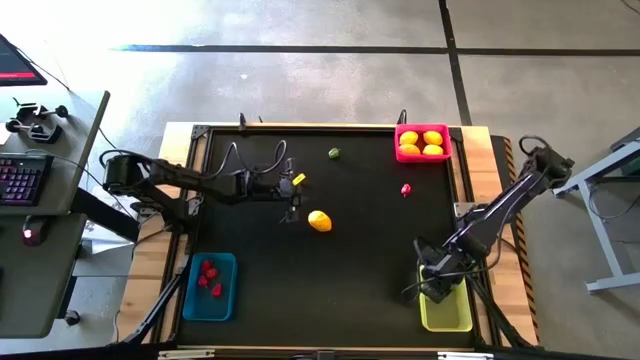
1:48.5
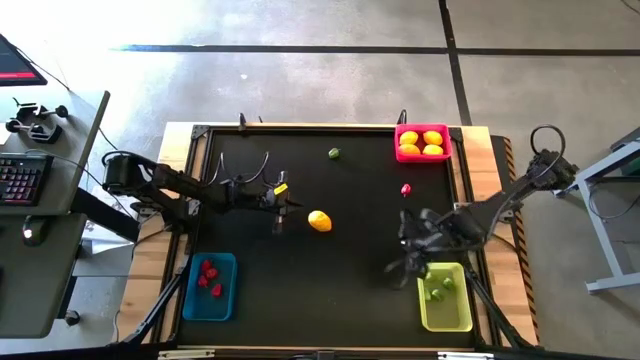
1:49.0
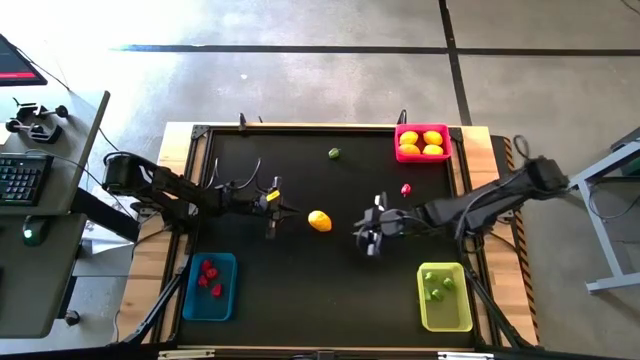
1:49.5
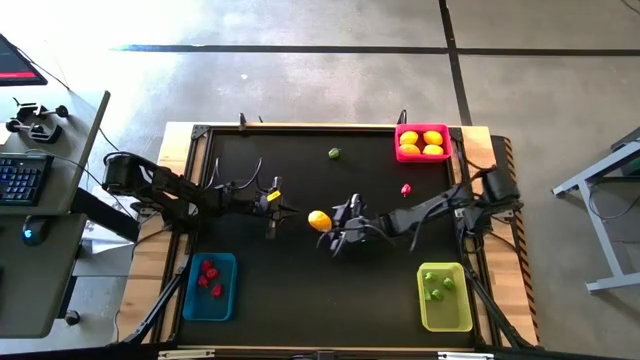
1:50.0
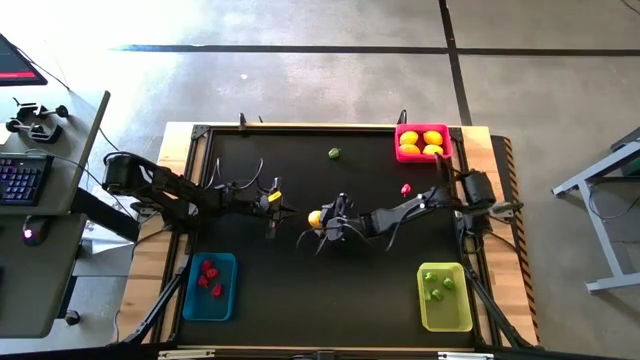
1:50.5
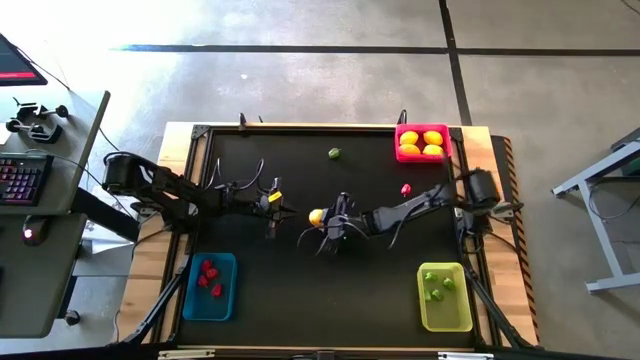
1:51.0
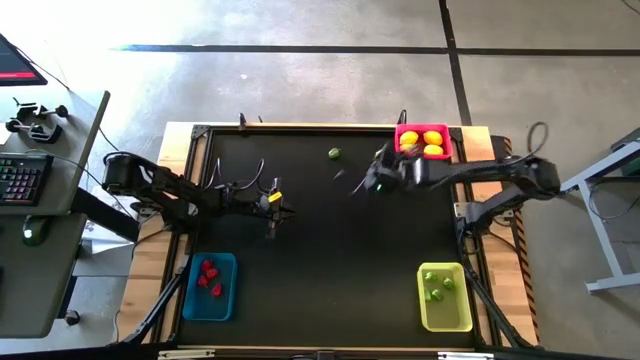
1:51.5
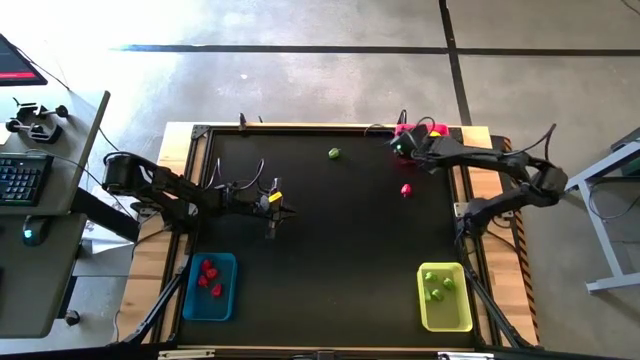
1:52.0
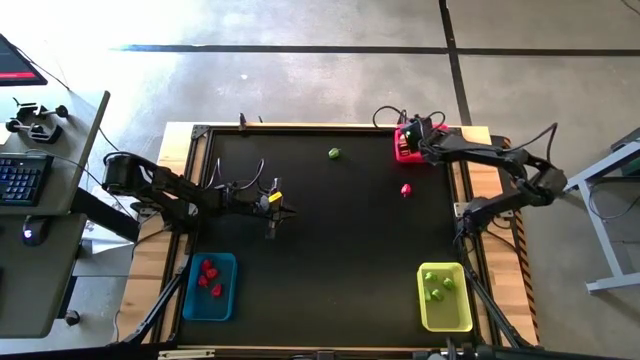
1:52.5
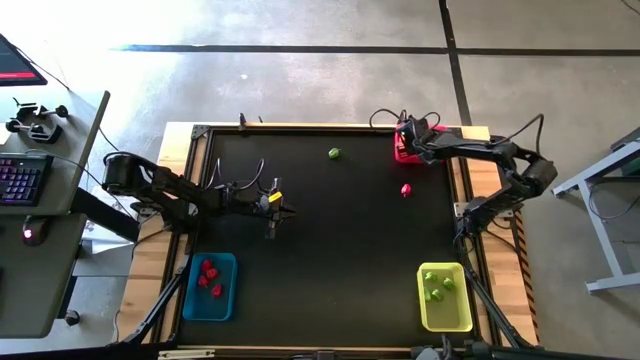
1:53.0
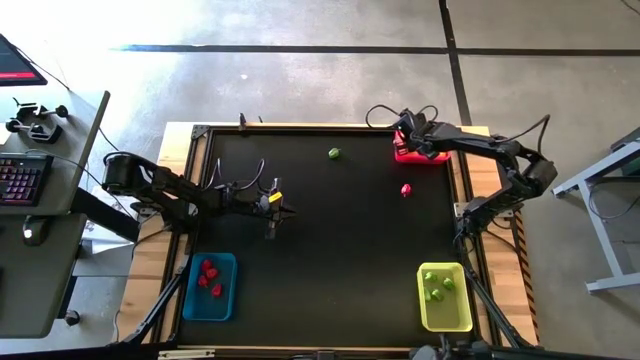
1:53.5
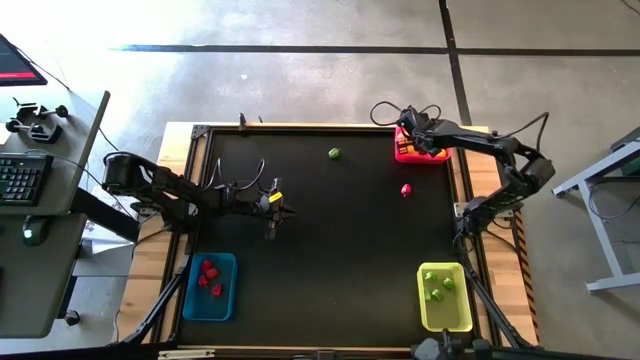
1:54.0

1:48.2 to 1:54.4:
Task: Sort produce into baskets
Put the lemon into the red bin

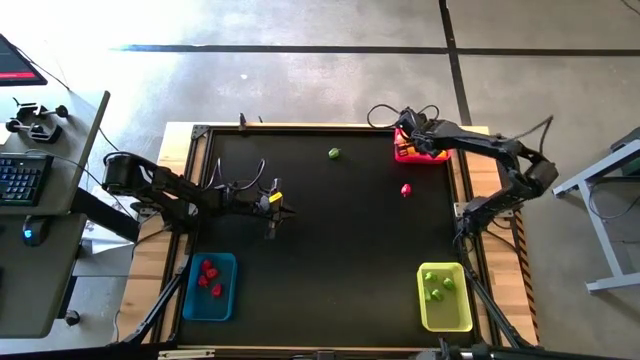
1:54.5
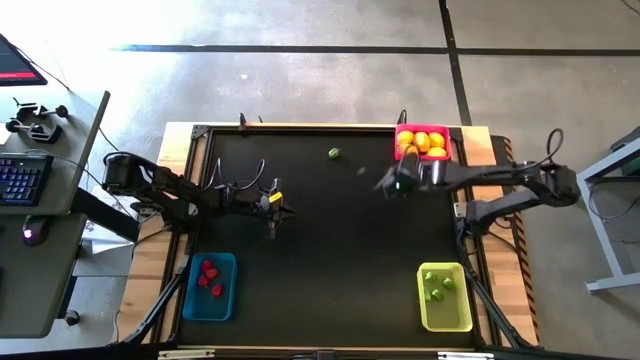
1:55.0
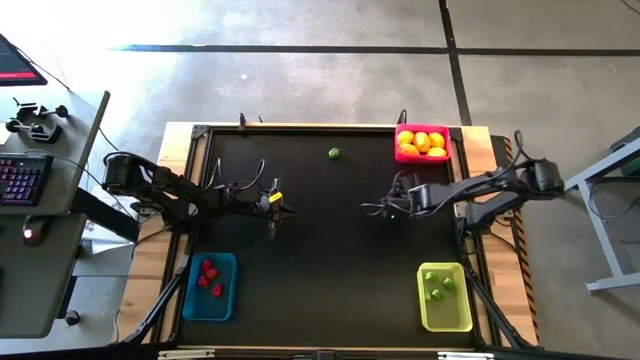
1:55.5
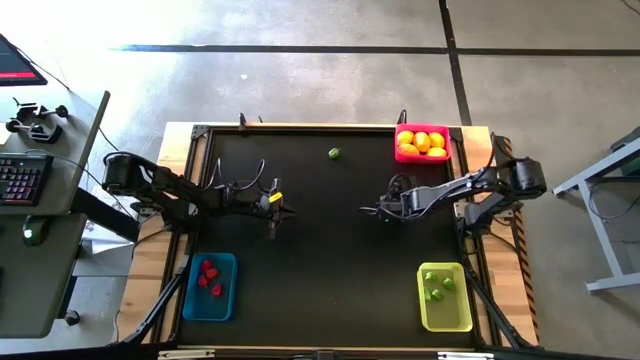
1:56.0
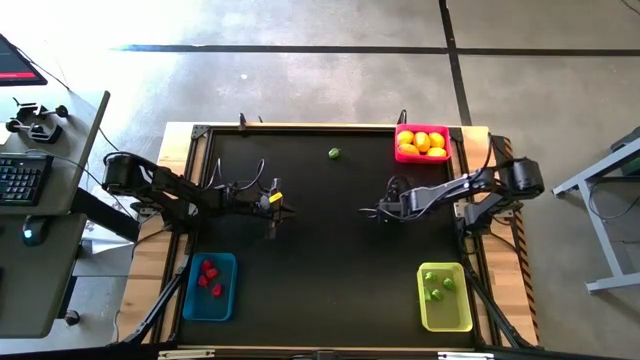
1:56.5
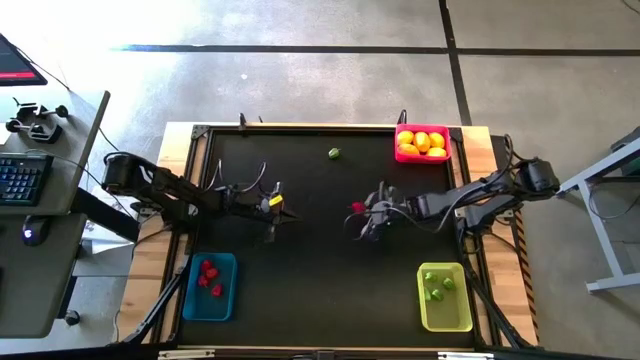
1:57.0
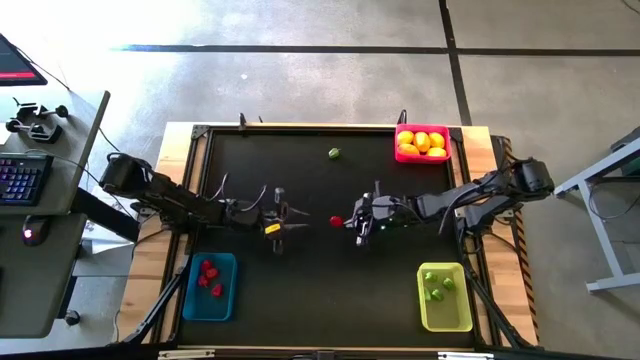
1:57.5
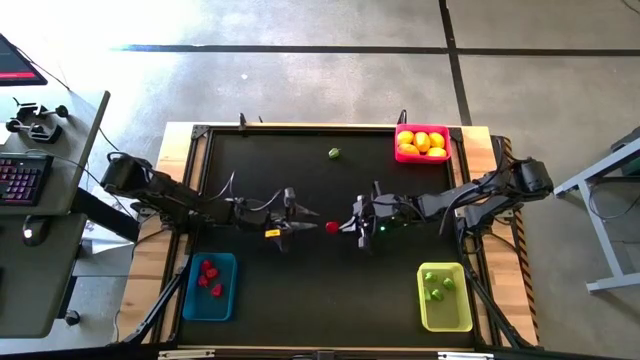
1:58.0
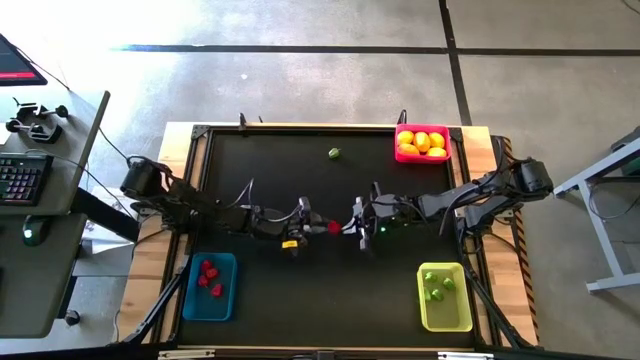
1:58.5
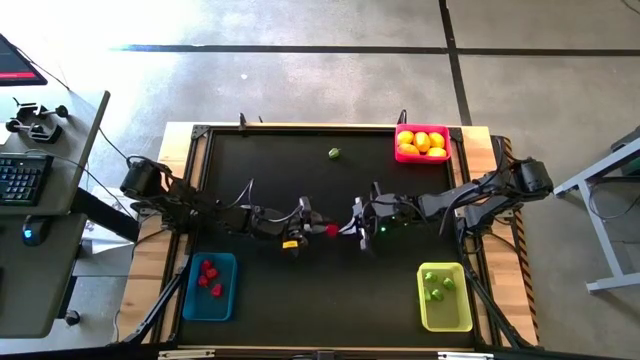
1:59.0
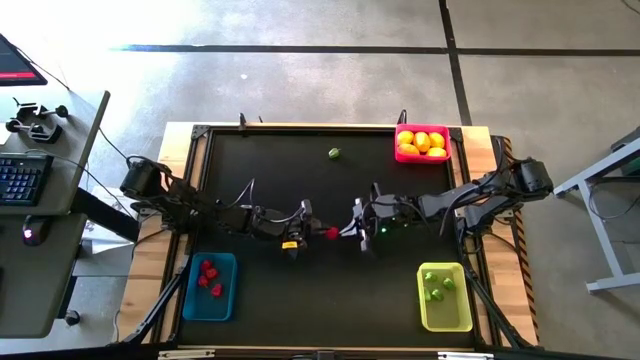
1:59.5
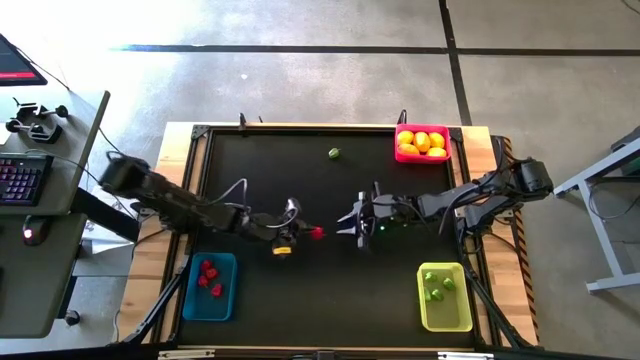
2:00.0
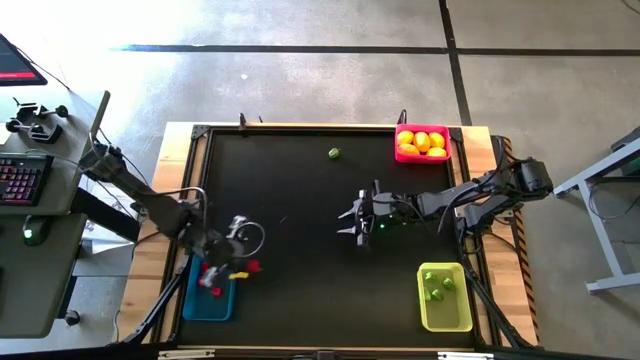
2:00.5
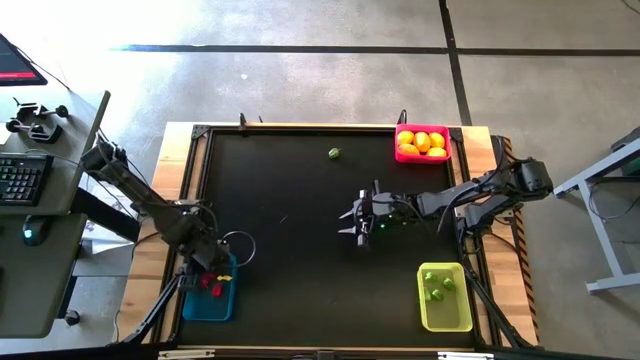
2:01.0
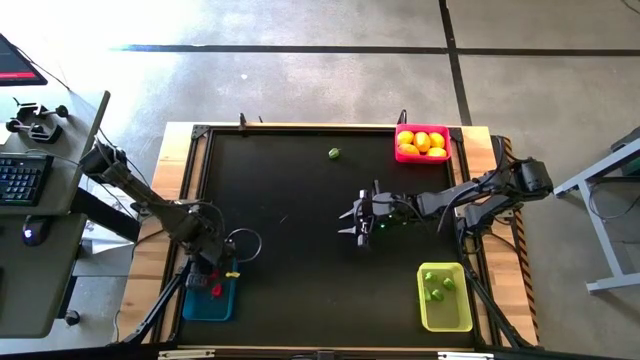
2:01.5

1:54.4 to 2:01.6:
Put the red chilli pepper into the blue bin

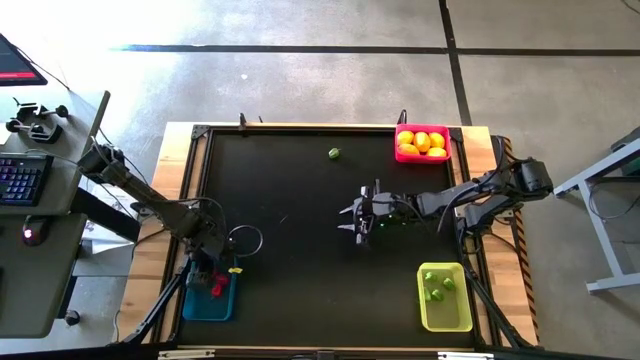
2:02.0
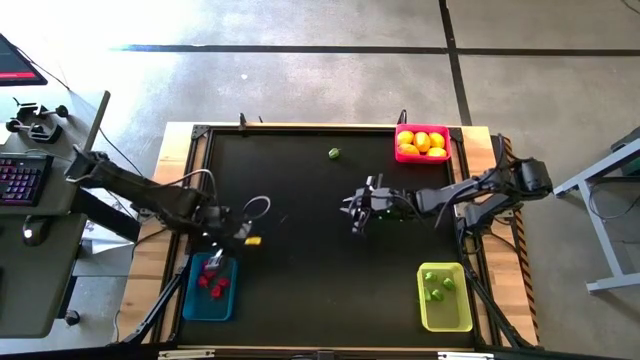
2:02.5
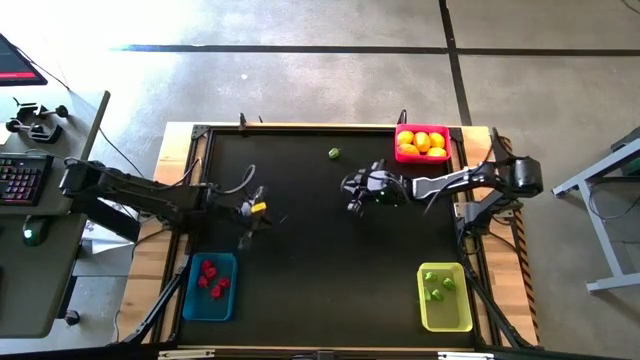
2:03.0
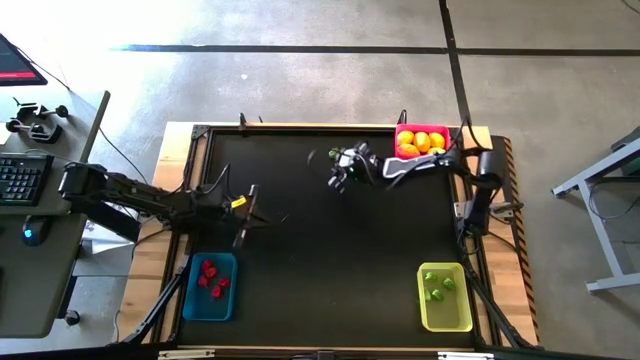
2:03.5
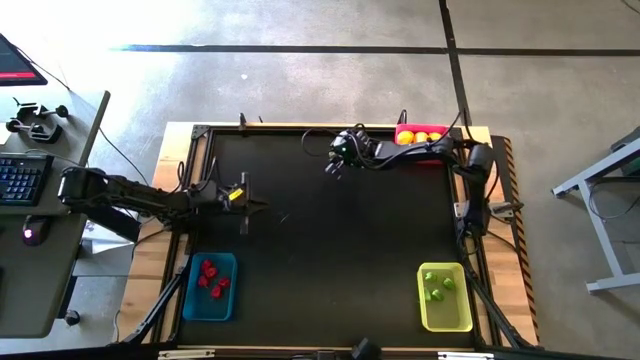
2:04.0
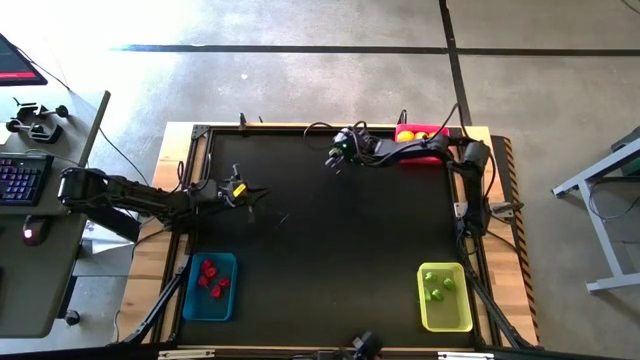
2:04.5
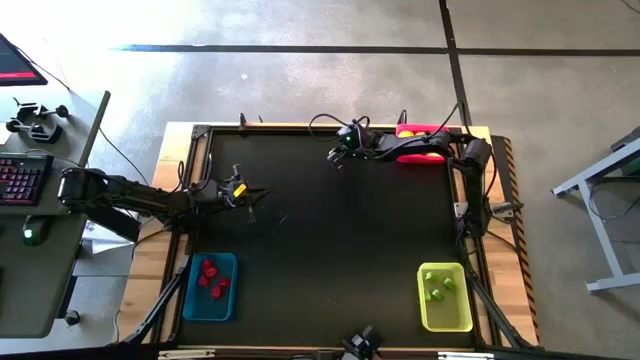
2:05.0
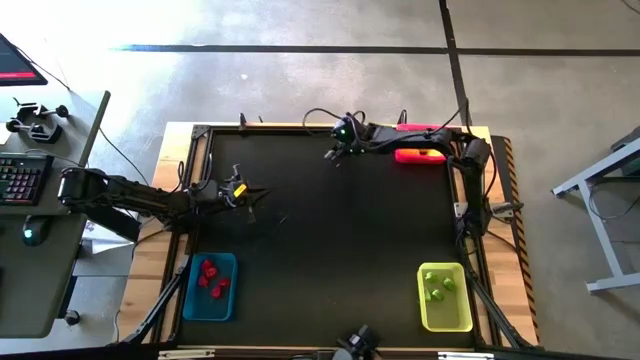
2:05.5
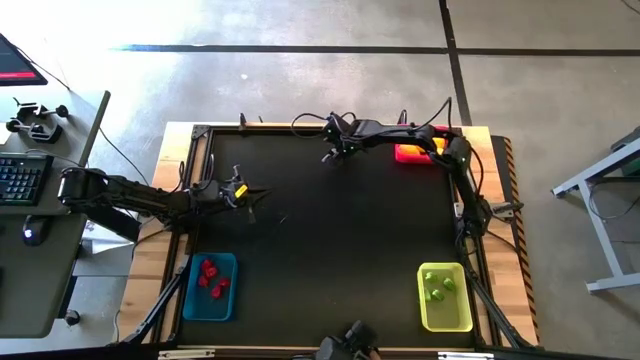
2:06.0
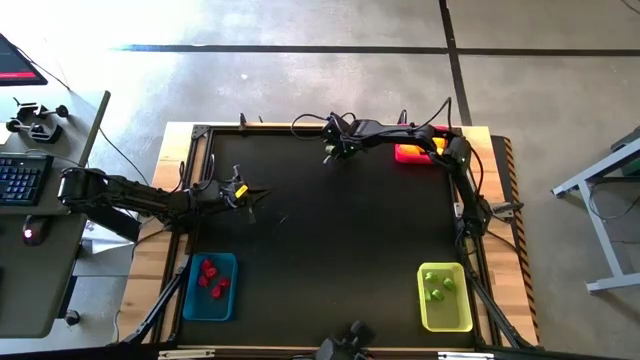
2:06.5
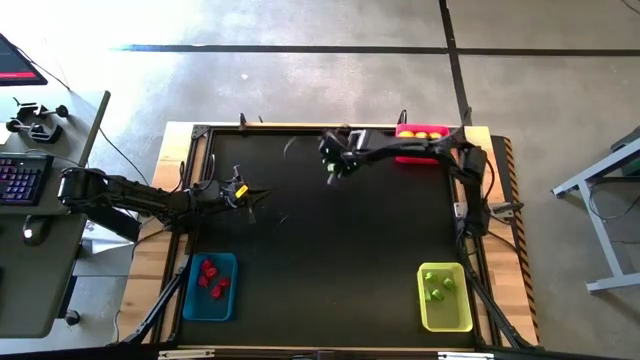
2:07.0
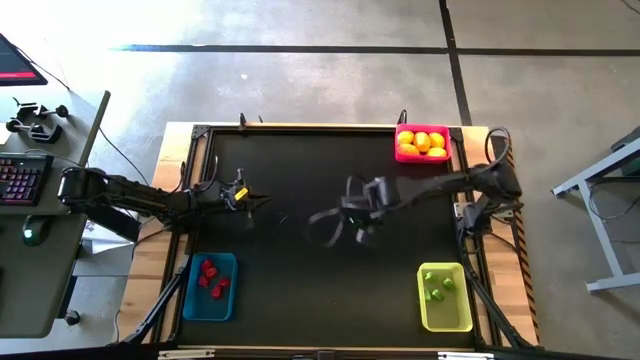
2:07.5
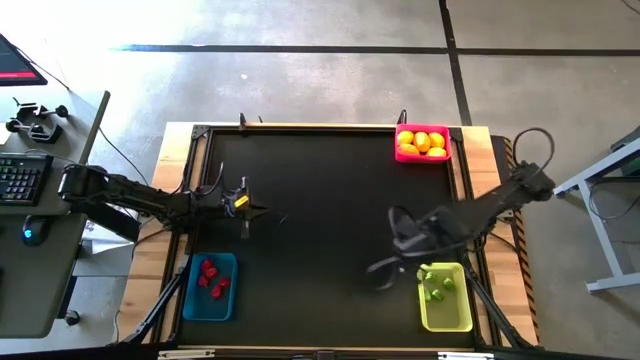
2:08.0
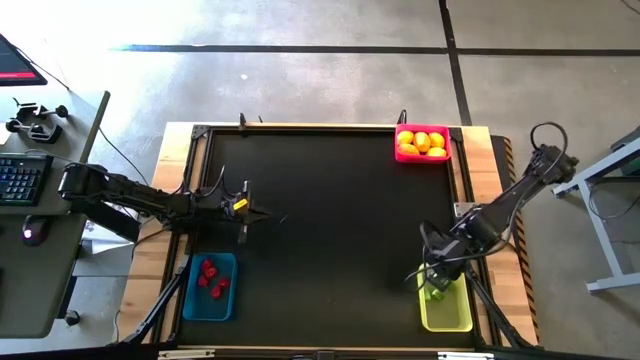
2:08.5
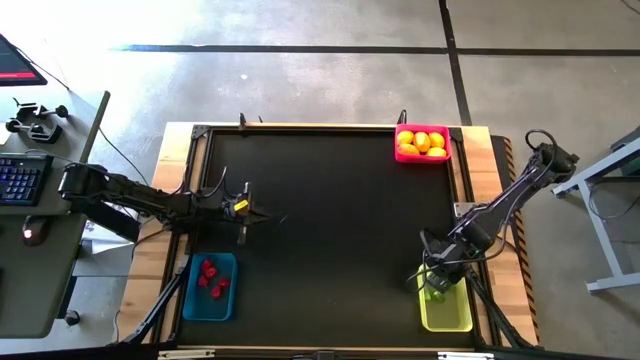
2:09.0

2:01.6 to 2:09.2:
Put the green chilli pepper into the yellow bin

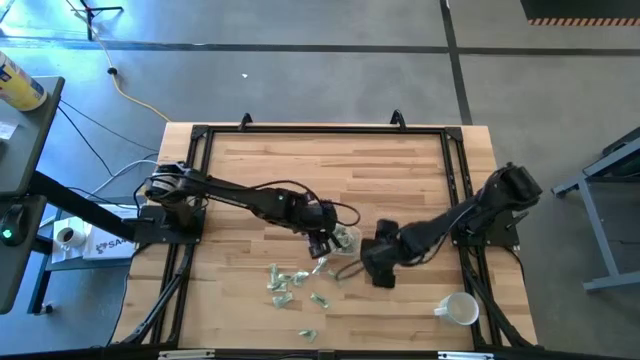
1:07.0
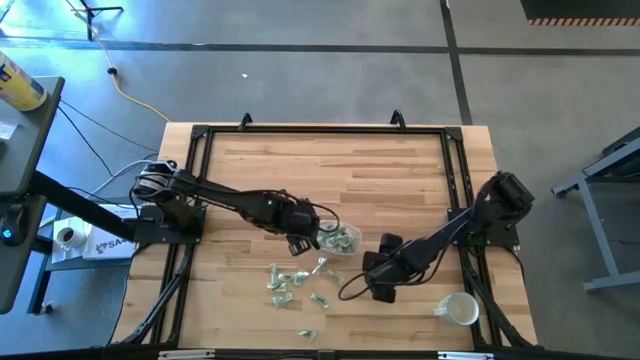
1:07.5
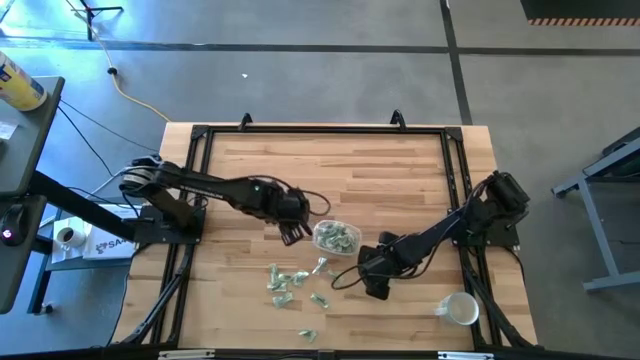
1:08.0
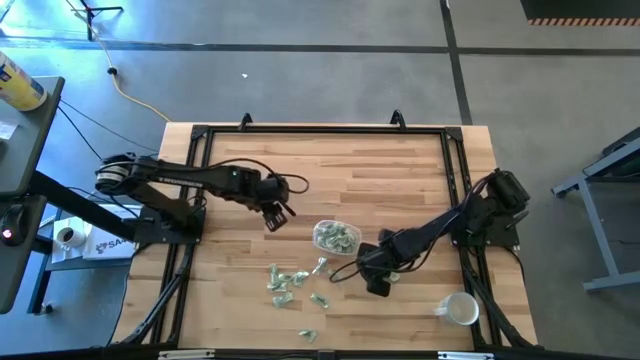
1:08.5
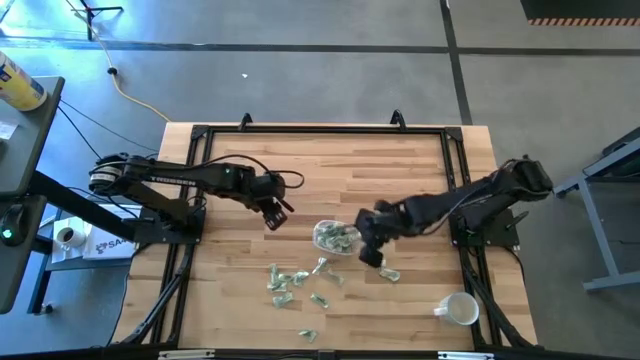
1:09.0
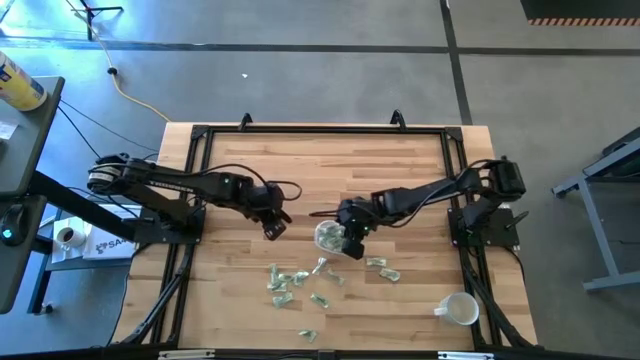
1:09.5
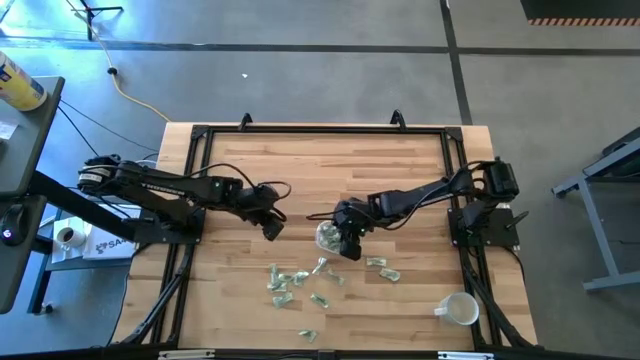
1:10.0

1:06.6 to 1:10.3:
Task: Pick and place Stevia / Truvia into bins
Put the green stevia packet into the transparent container
